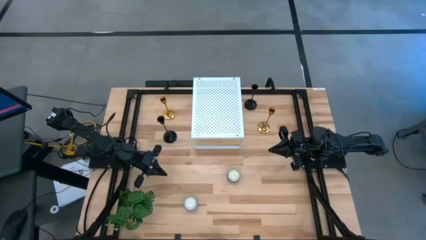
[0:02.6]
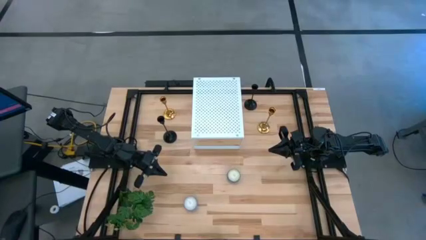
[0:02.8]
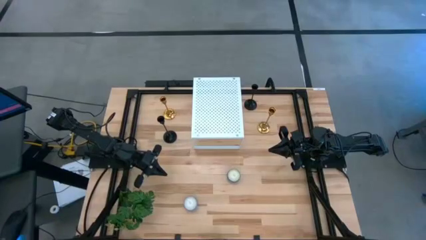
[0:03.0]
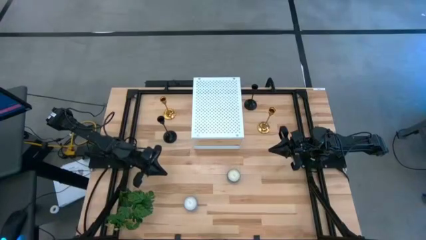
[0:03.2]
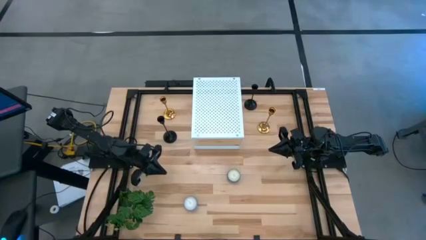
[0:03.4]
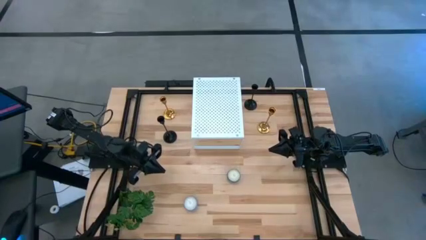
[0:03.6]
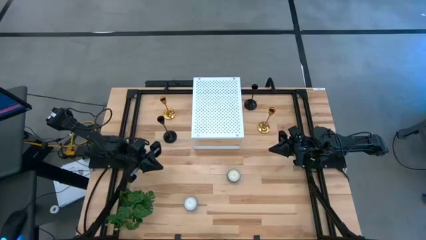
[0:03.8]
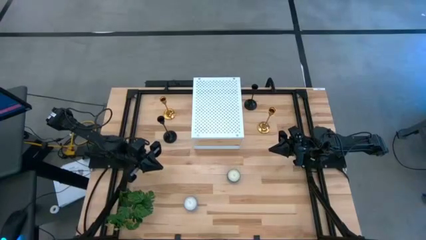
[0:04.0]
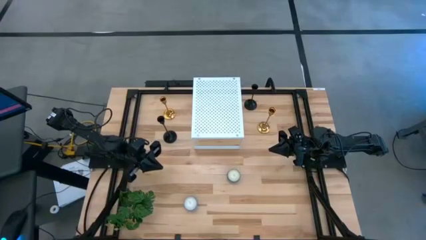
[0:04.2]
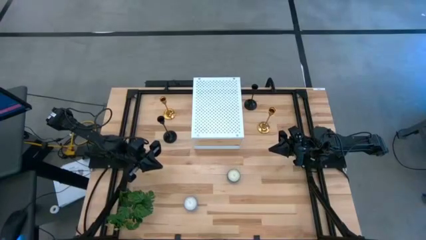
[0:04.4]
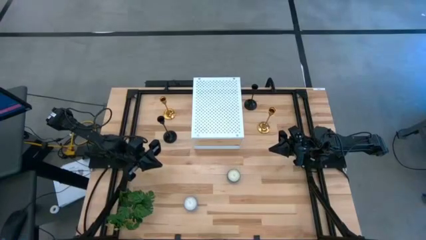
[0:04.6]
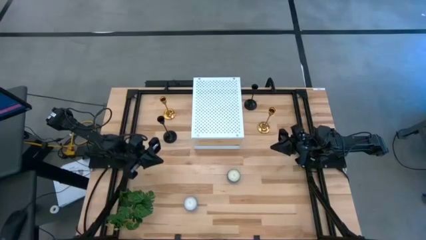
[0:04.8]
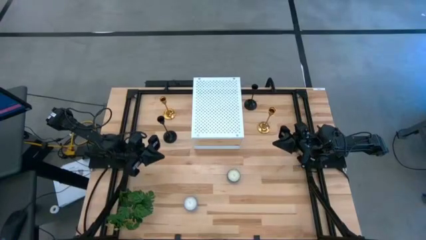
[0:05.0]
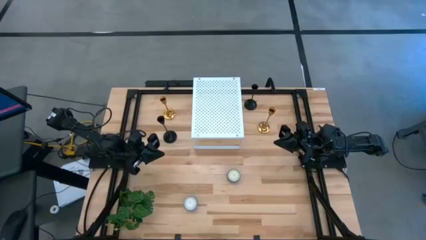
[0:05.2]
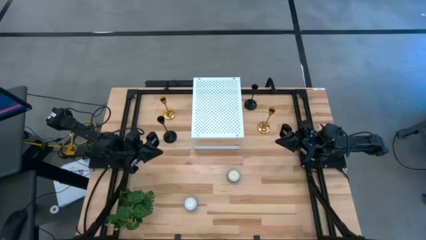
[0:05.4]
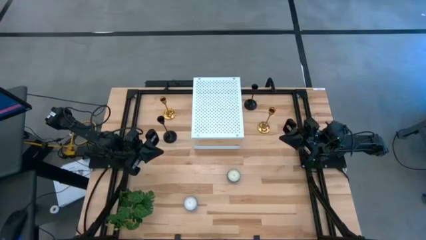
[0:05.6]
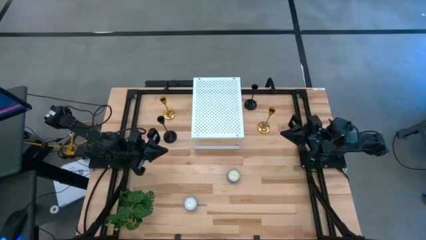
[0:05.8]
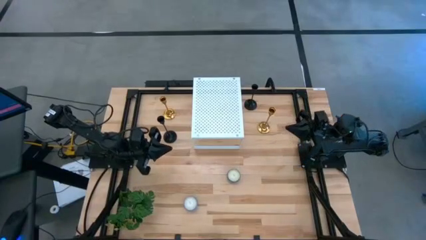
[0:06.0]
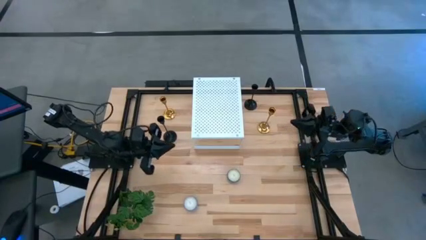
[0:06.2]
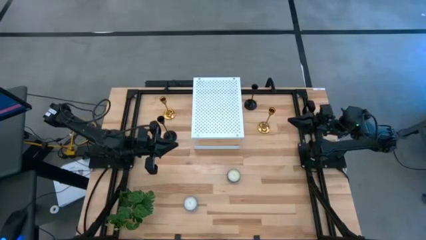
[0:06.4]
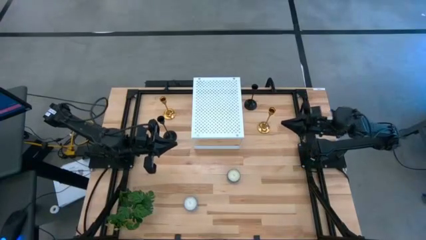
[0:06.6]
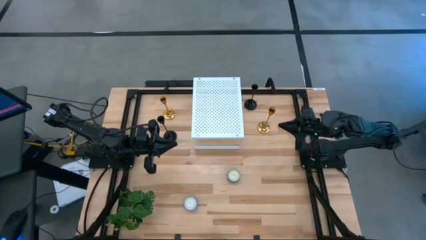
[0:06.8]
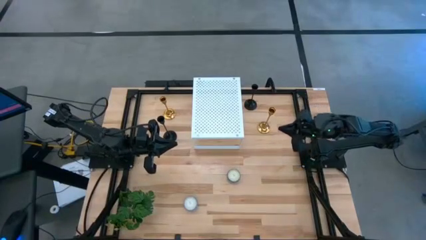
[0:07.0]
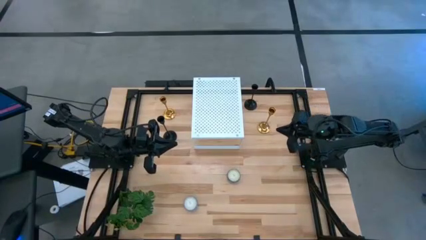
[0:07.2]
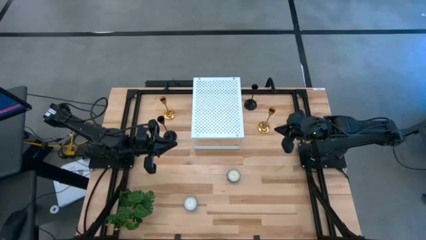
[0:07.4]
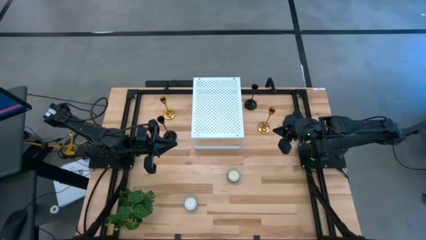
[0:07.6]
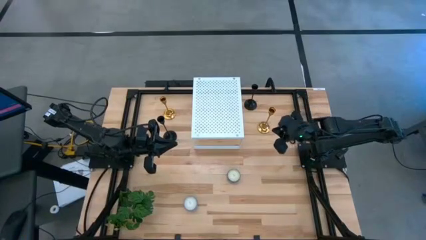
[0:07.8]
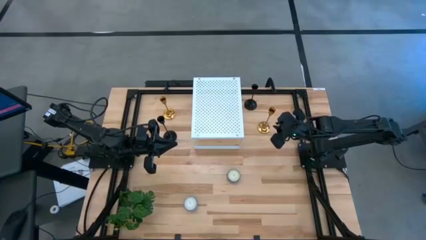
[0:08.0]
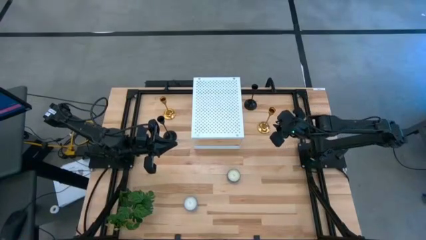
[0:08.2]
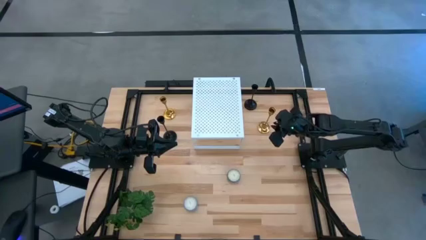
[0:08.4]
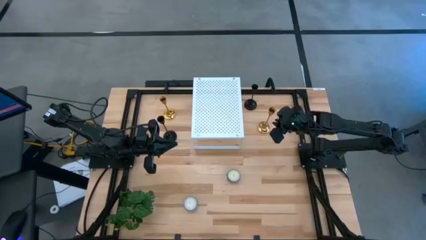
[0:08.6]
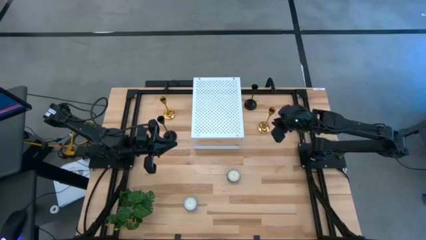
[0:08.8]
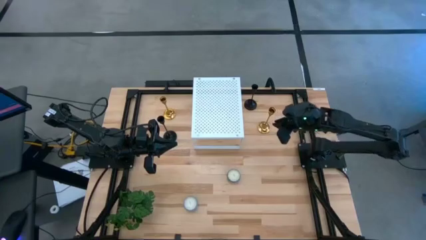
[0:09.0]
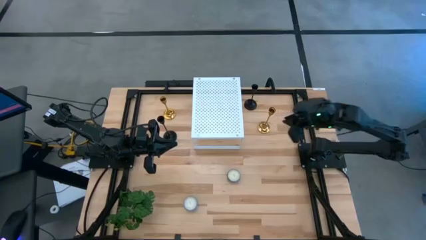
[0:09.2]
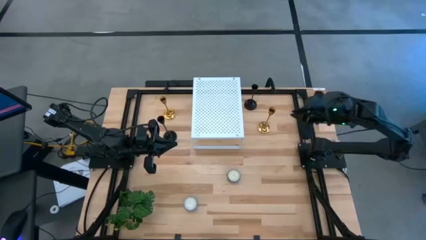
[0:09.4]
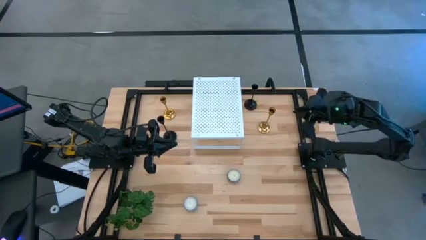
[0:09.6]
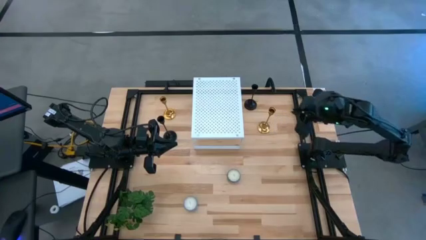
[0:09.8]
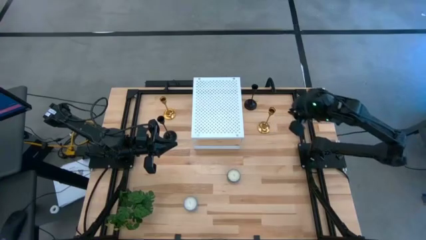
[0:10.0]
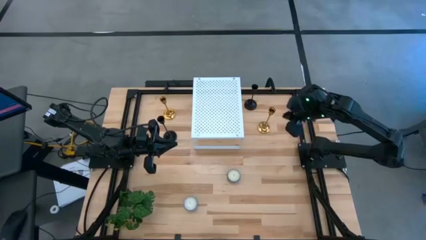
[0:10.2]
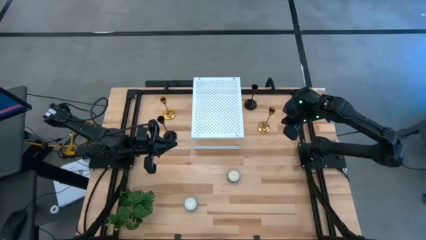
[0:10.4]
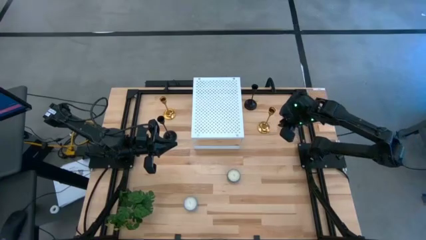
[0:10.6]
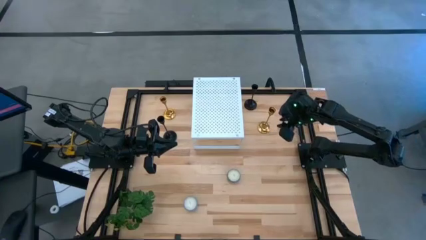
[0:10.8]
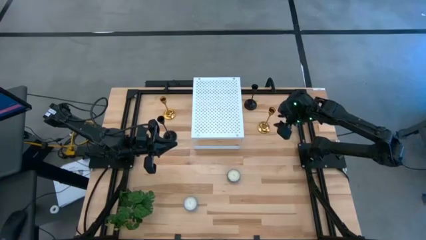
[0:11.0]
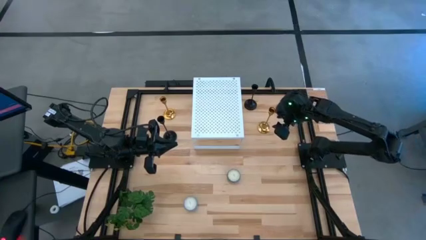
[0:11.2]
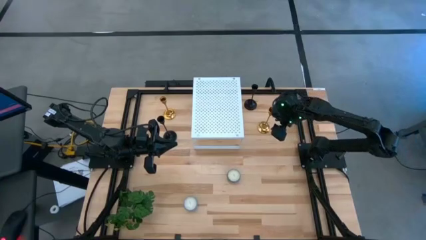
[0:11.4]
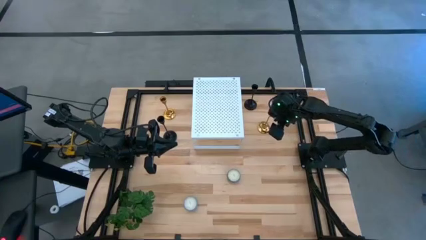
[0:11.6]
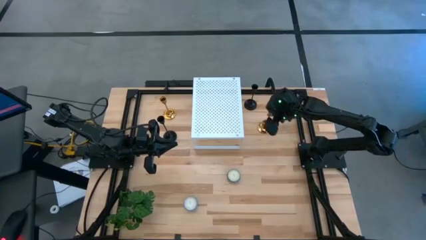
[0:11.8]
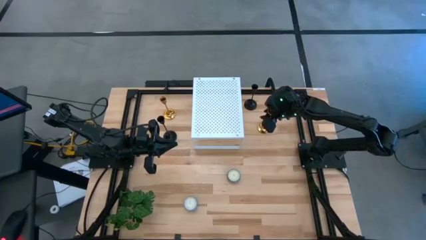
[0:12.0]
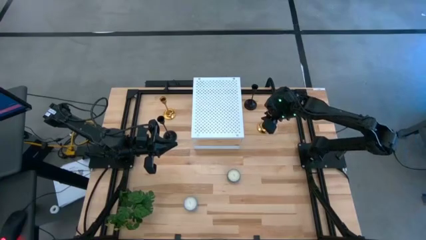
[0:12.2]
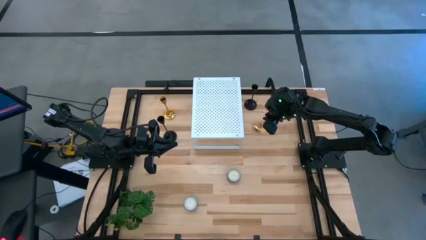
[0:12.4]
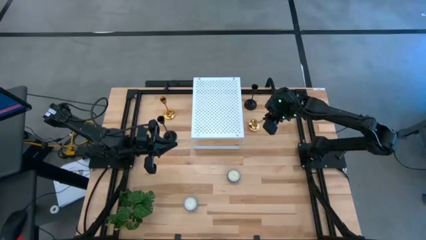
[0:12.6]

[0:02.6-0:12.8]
Task: Pick & Place candle stick holders
Put the large golden candle holder on the shelf

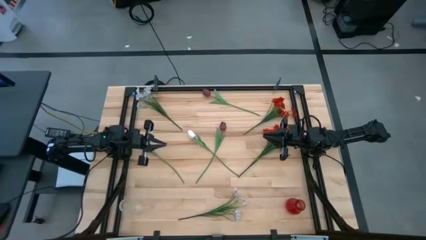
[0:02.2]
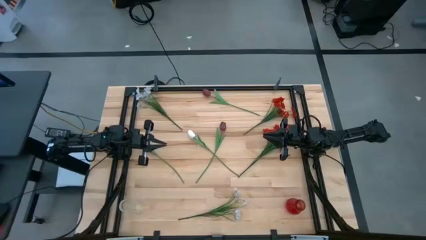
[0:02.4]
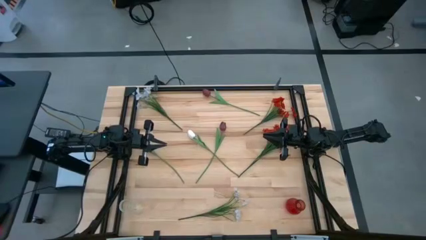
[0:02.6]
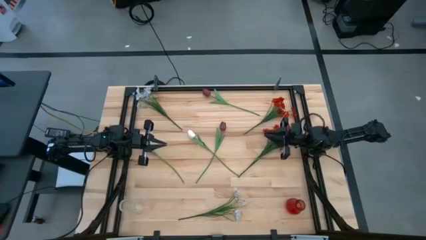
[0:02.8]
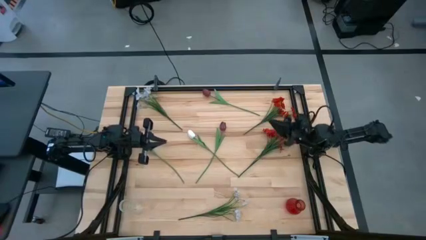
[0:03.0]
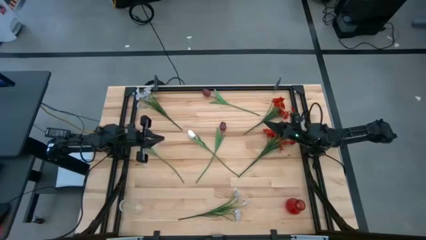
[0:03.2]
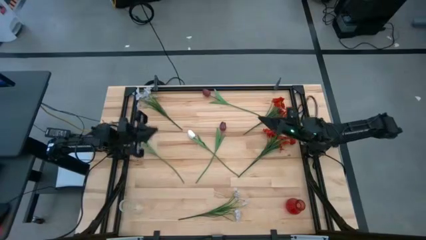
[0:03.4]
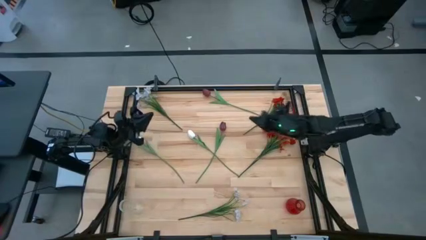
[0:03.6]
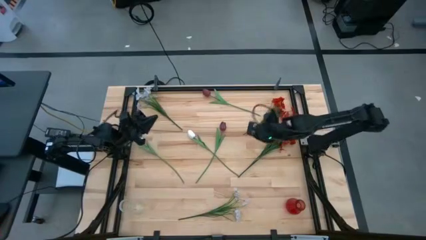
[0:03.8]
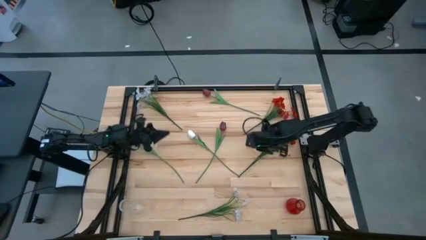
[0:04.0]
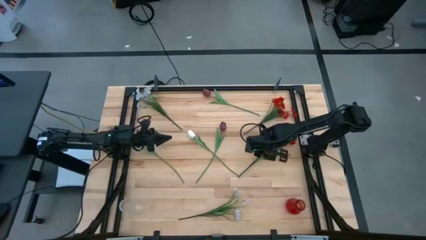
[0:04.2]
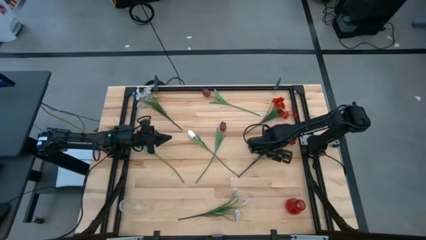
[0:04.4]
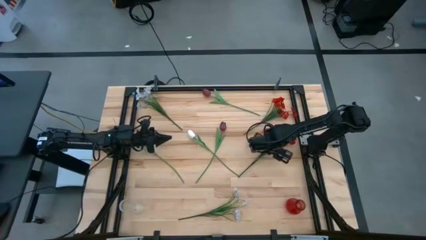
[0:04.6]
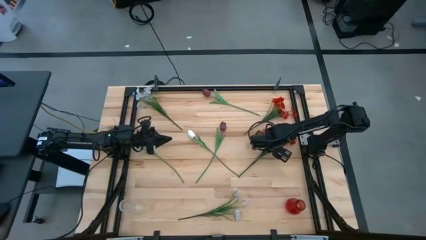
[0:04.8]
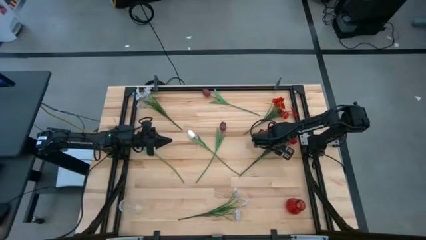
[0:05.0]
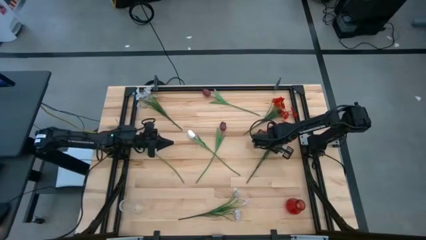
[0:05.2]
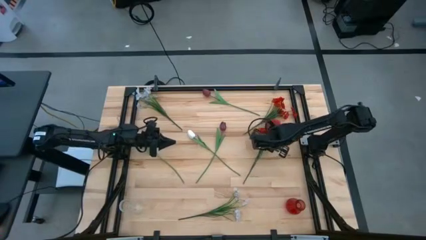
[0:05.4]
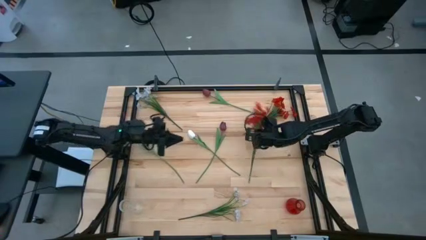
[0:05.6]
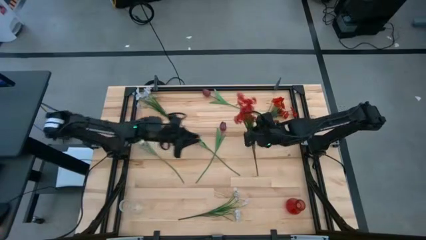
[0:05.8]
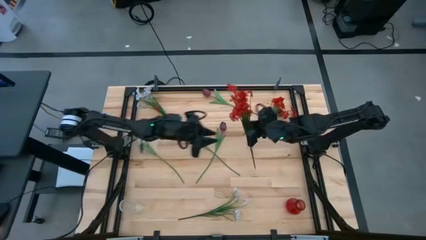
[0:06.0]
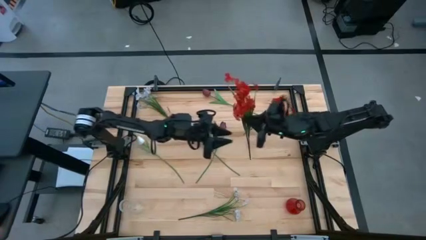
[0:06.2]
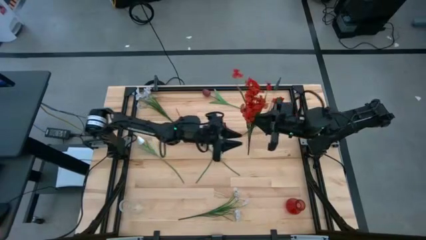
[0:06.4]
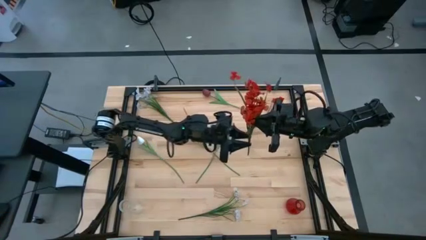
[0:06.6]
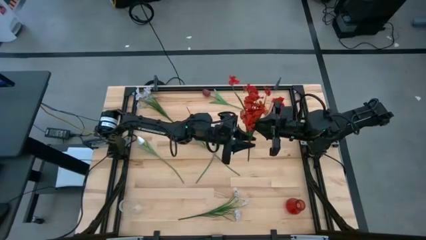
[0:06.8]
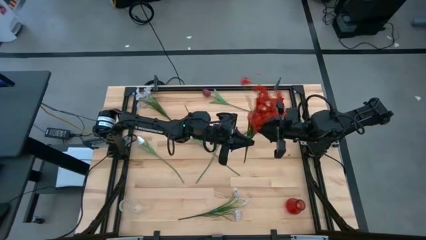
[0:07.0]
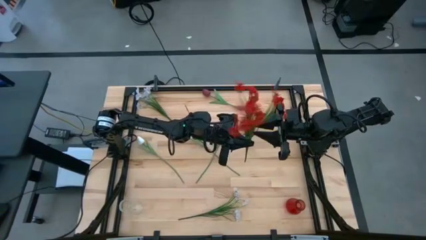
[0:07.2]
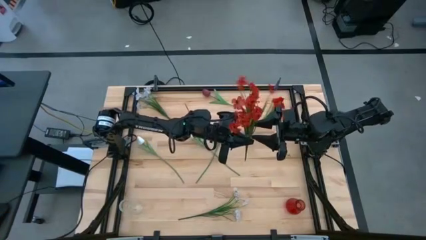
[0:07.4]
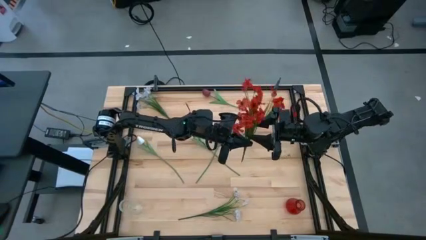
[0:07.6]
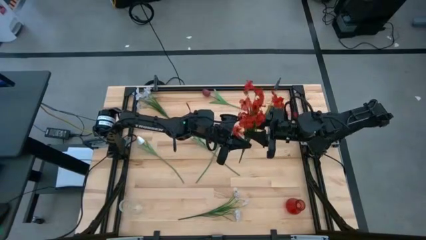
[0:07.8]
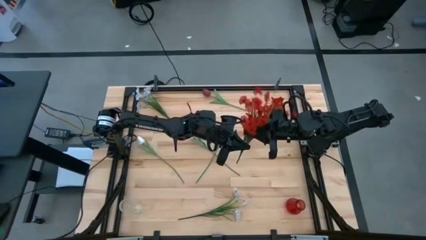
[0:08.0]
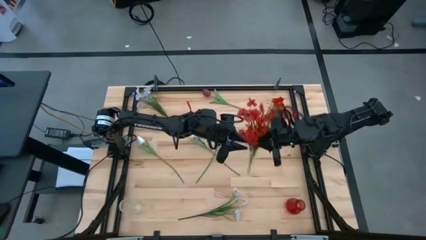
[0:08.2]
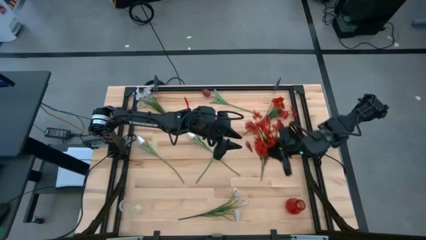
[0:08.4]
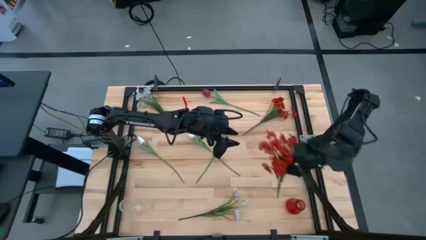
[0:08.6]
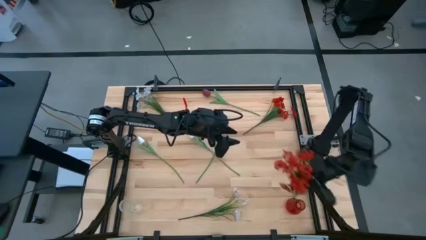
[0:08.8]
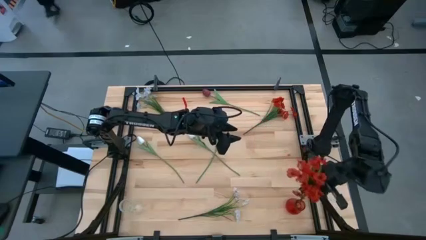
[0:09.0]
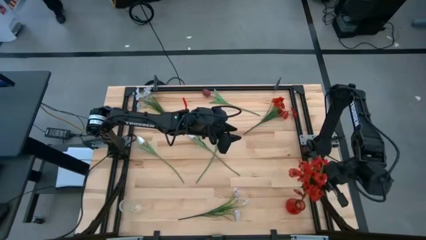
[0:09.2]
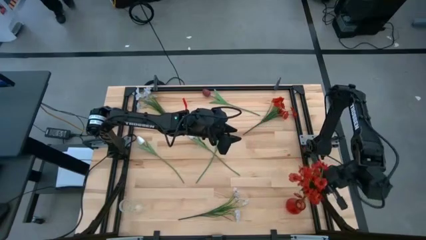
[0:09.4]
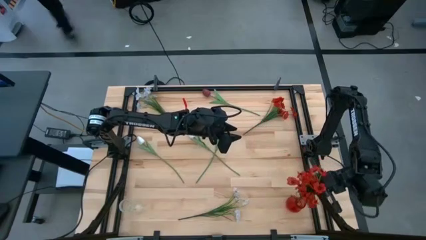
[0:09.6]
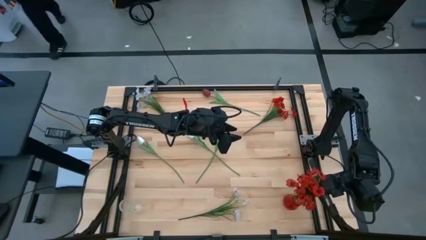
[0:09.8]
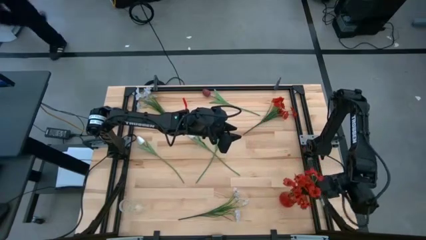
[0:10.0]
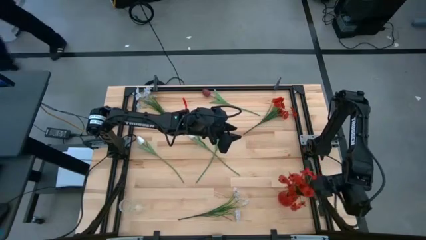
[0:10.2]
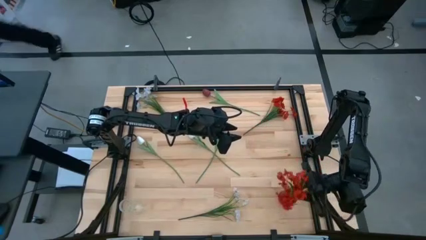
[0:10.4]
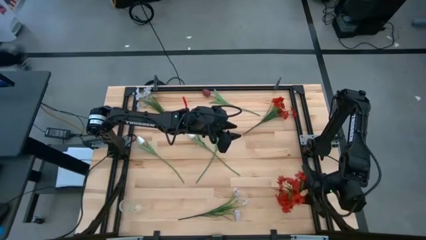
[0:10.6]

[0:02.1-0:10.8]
Task: Sort flowers into vase by color
Put the bottom orange flowers into the red vase
